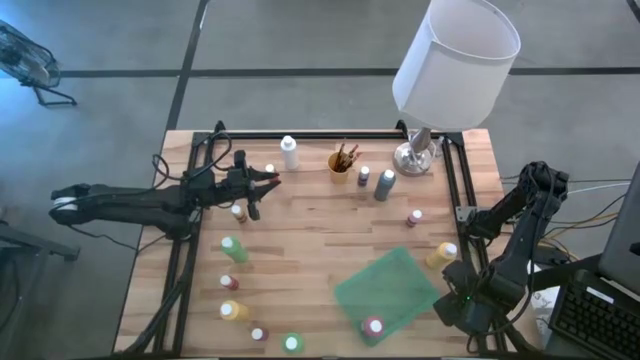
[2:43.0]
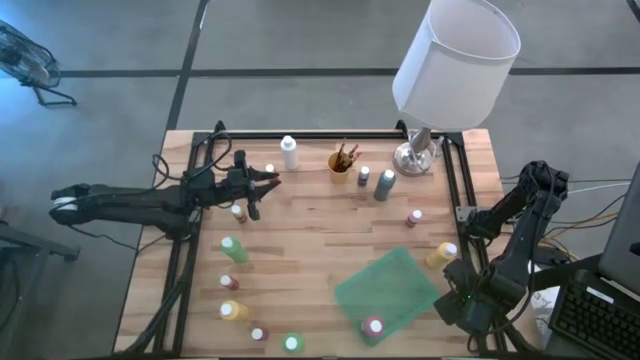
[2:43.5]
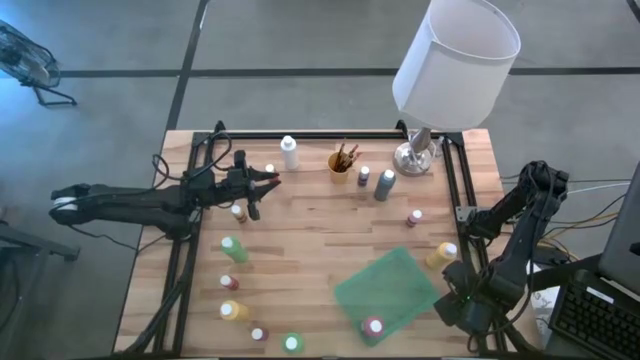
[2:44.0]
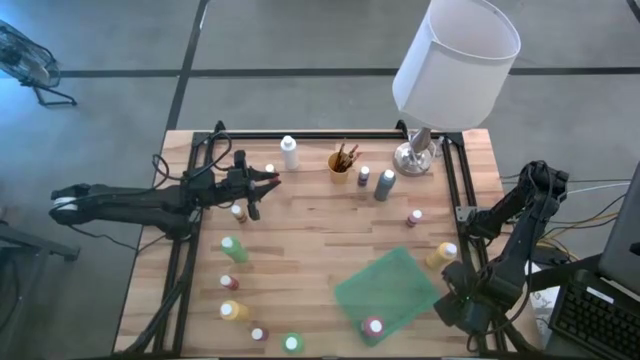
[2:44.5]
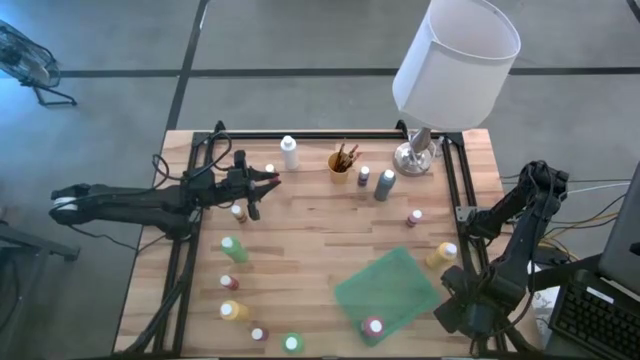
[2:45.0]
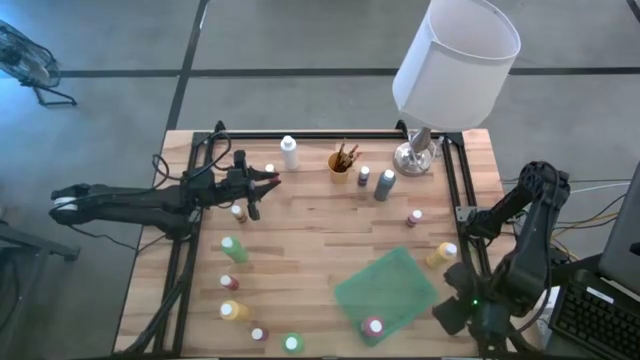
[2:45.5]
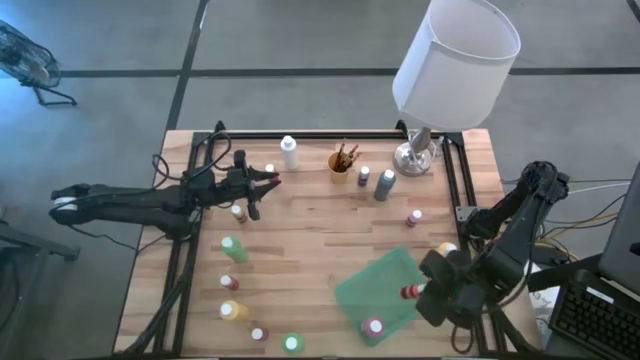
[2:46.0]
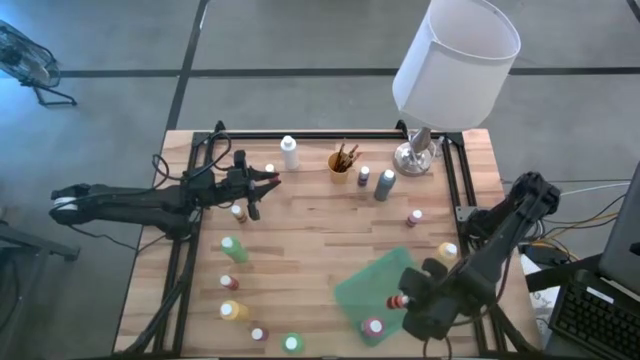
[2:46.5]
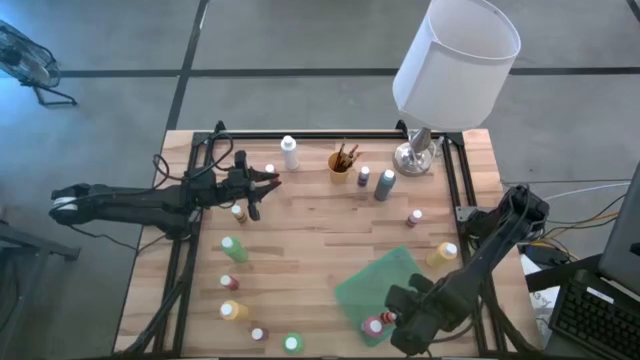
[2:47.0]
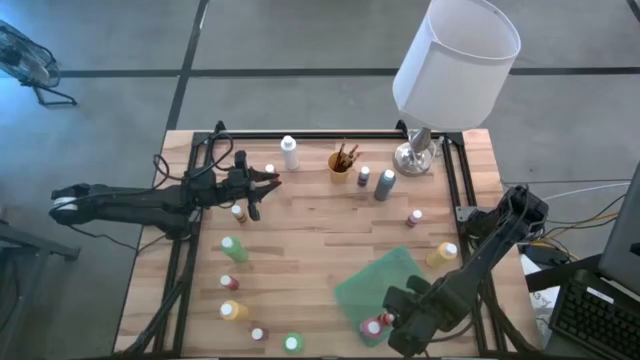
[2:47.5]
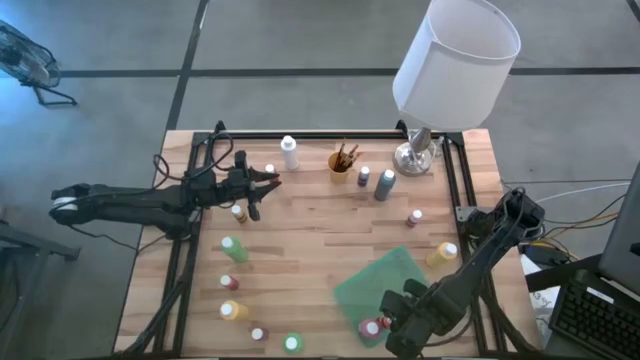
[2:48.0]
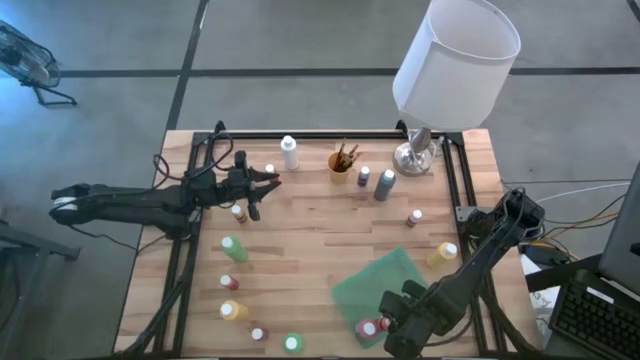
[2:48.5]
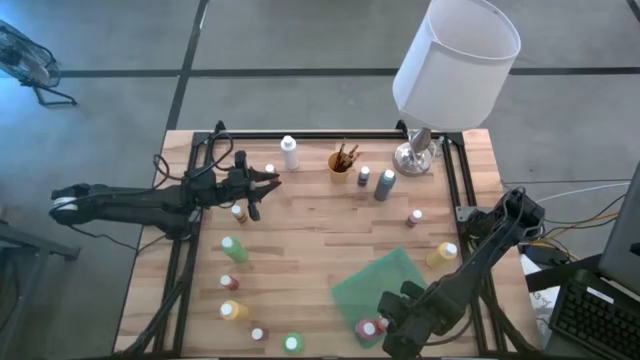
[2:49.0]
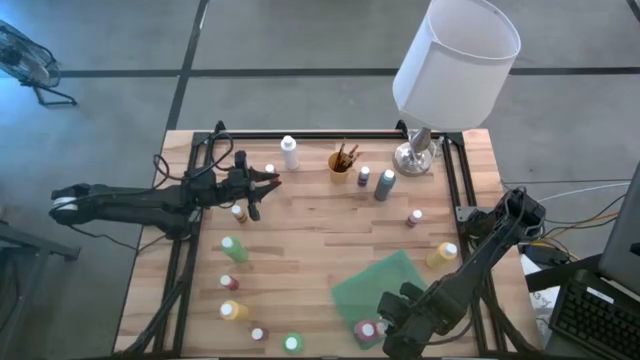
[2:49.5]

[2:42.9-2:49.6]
Task: Pick & Place Paint Supplies
Put the orange paint bottle into the green bin

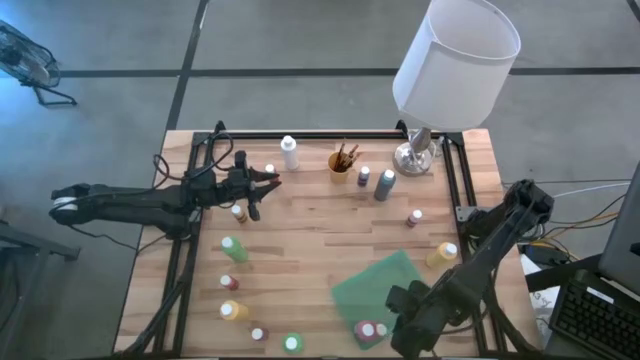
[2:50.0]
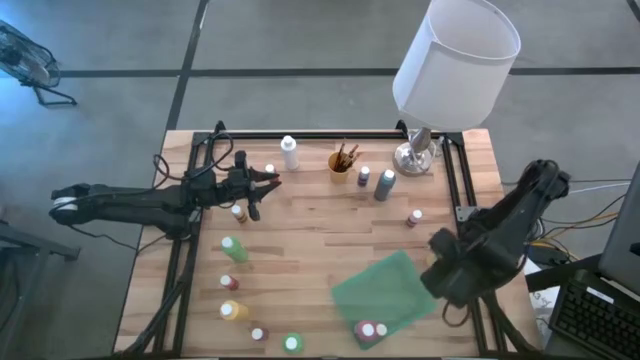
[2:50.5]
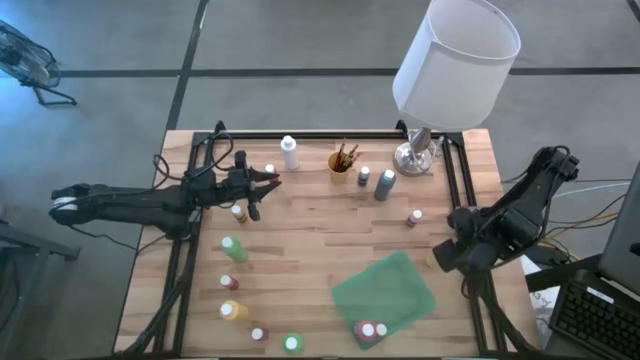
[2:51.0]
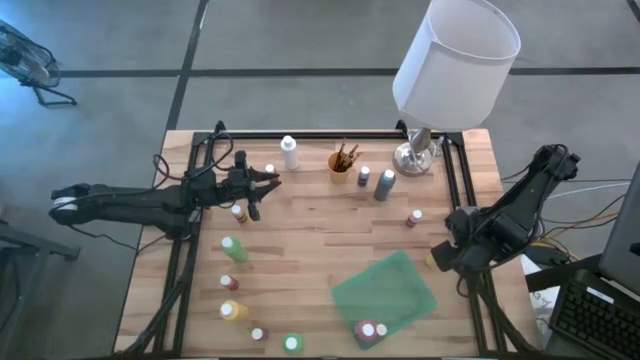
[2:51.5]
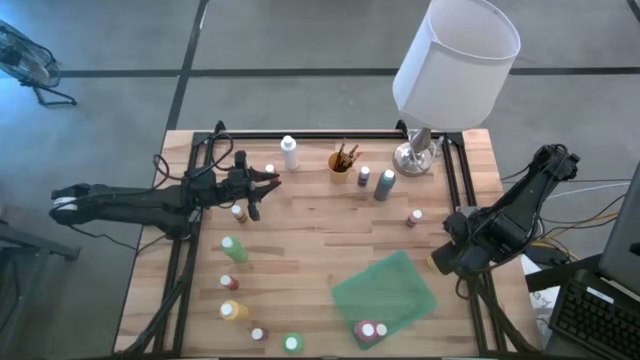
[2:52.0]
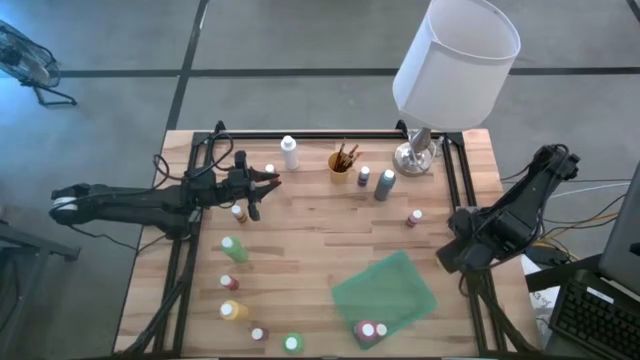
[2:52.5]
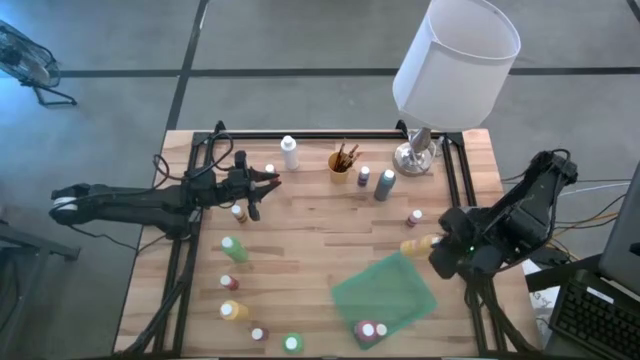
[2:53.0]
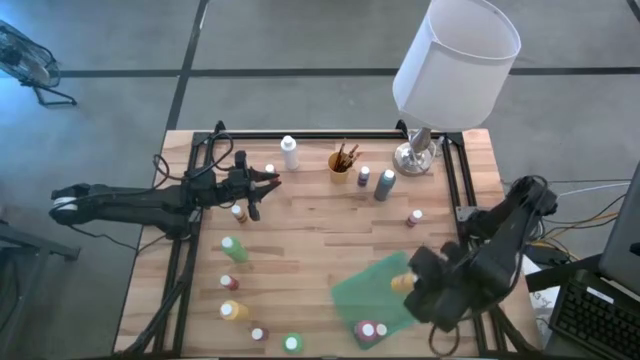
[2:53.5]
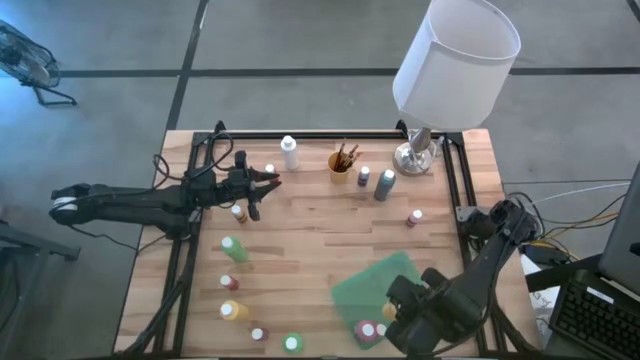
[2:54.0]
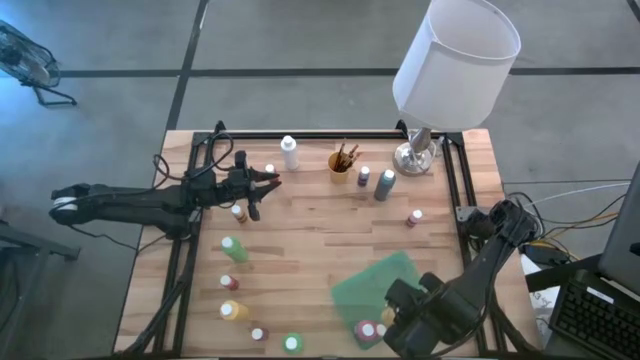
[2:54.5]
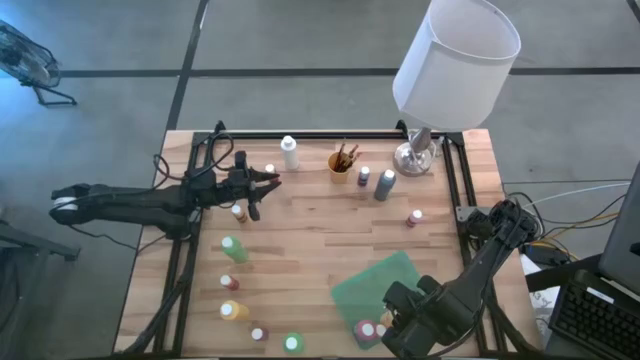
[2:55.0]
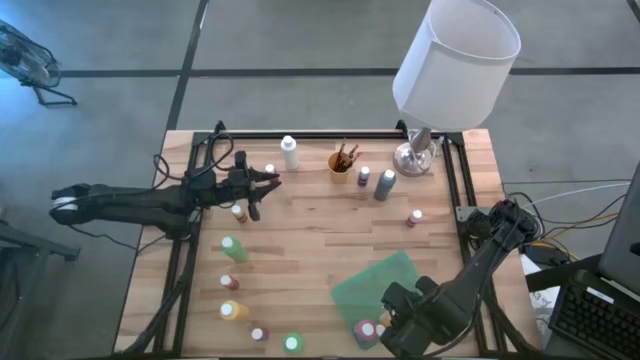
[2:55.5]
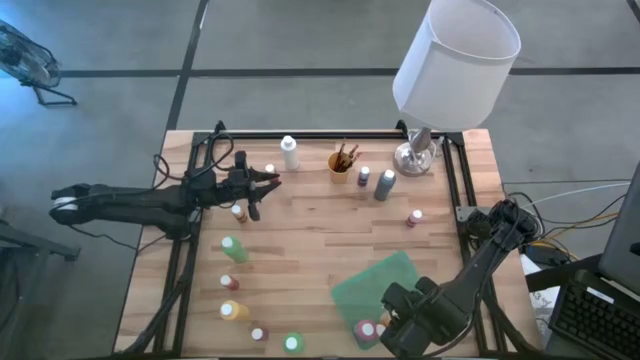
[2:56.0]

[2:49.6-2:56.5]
Put the big yellow paint bottle into the green bin

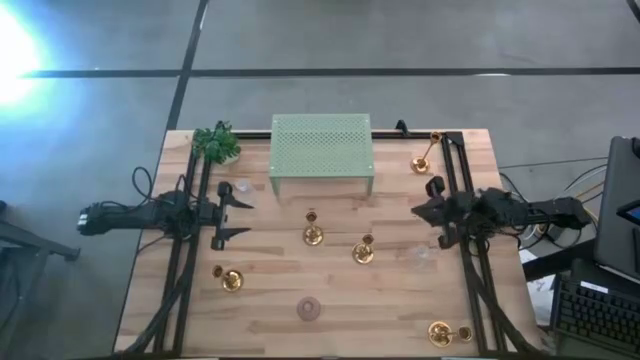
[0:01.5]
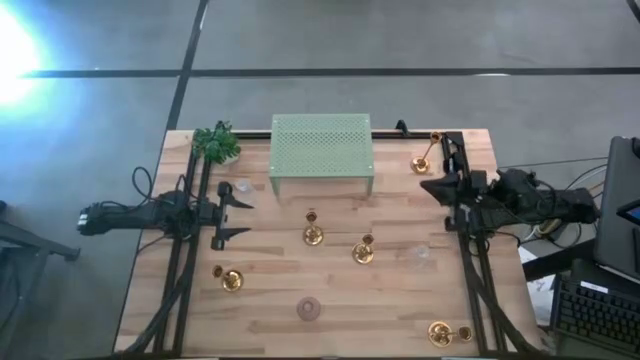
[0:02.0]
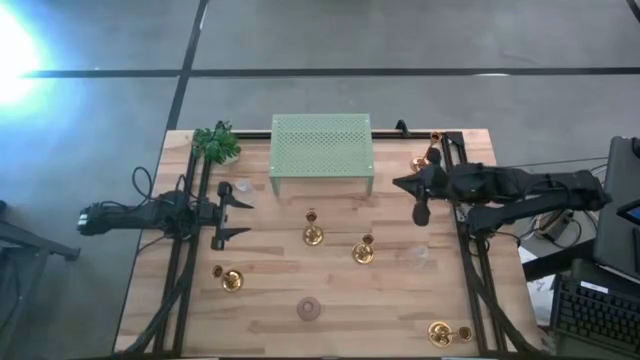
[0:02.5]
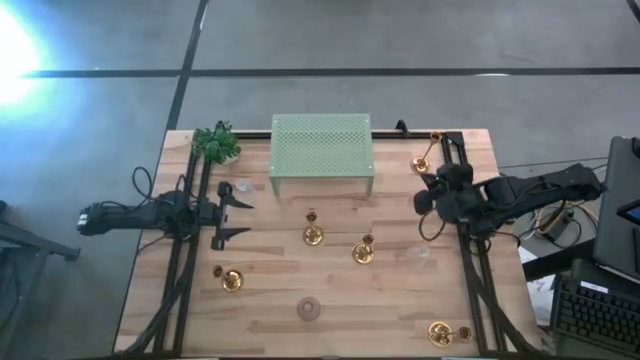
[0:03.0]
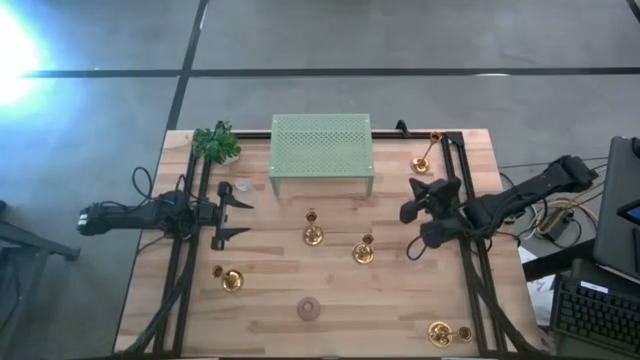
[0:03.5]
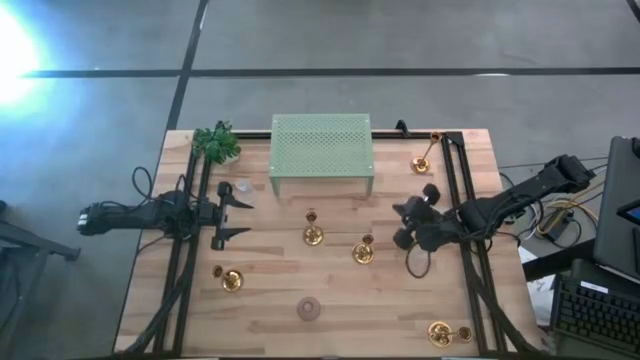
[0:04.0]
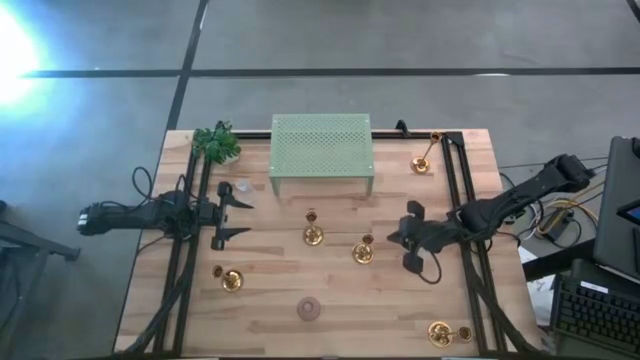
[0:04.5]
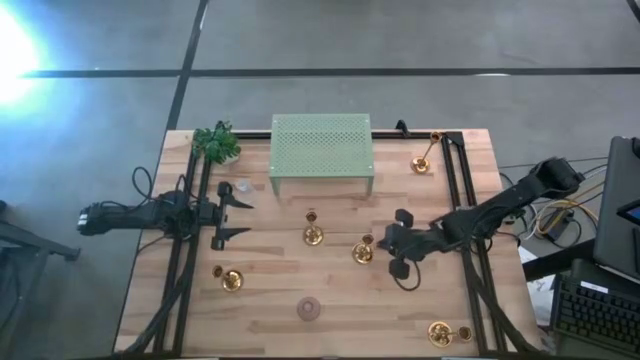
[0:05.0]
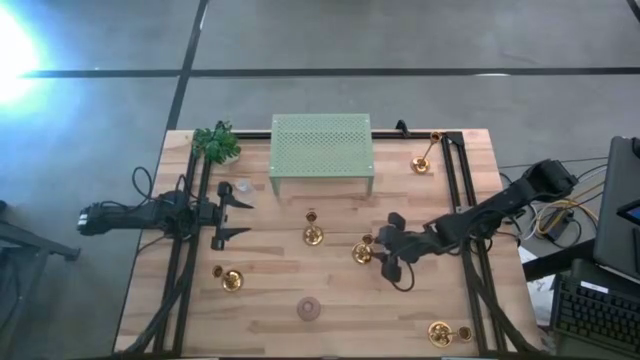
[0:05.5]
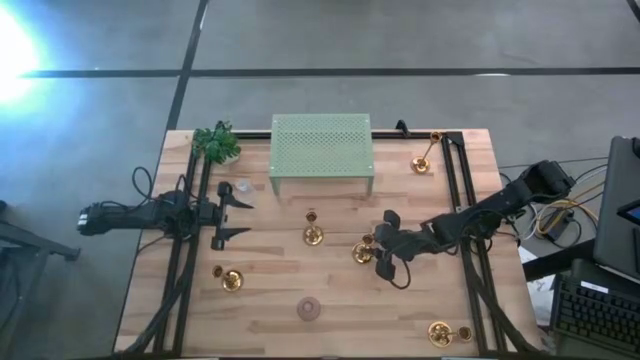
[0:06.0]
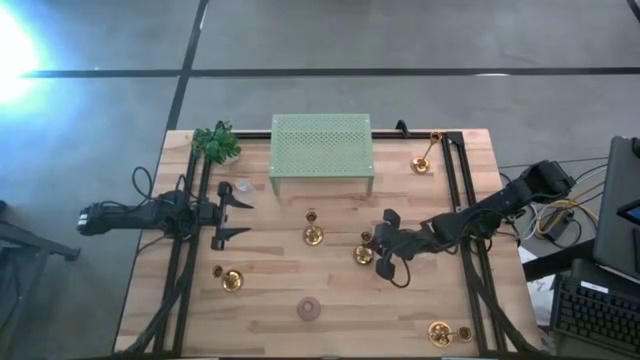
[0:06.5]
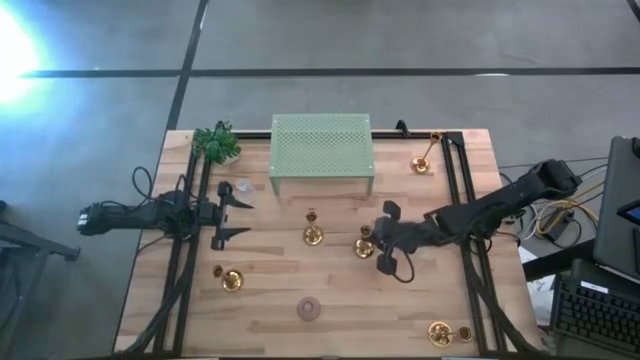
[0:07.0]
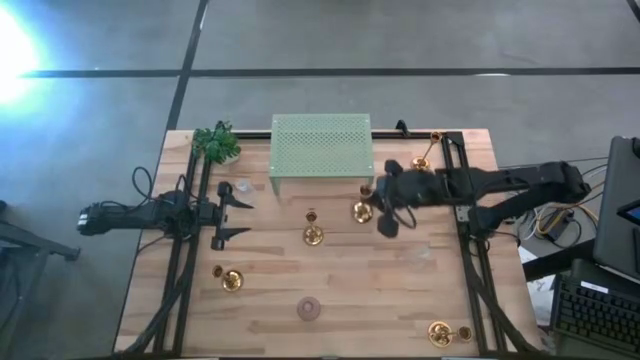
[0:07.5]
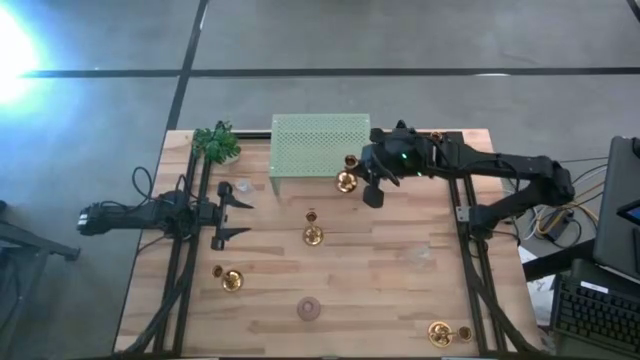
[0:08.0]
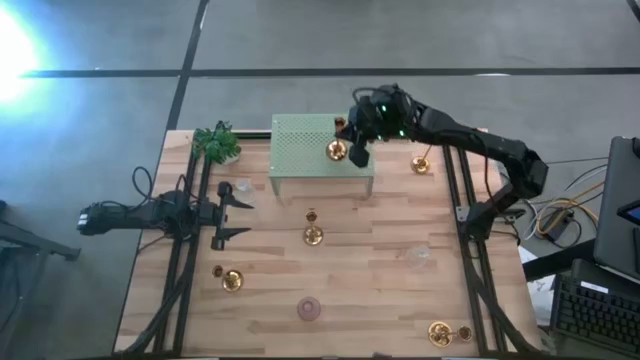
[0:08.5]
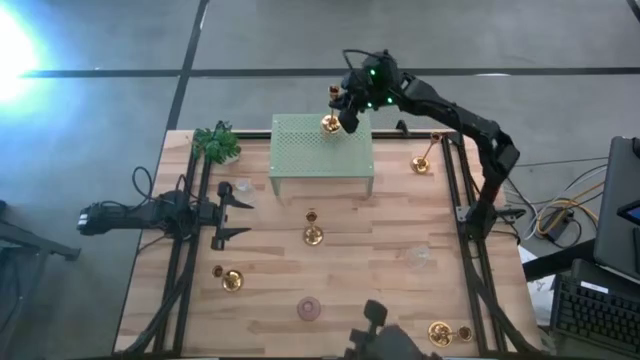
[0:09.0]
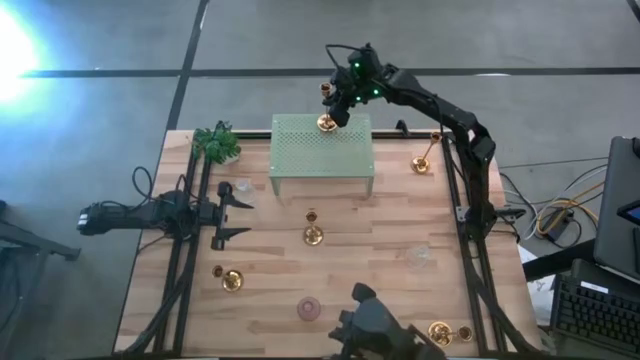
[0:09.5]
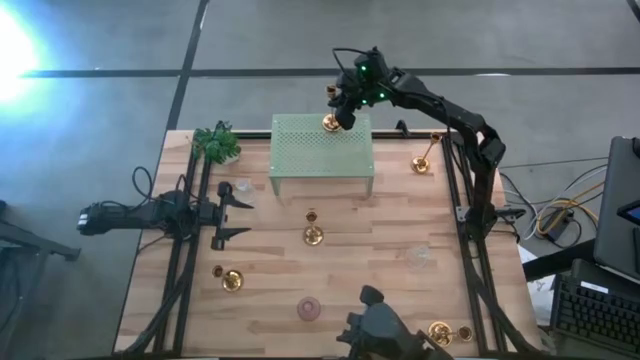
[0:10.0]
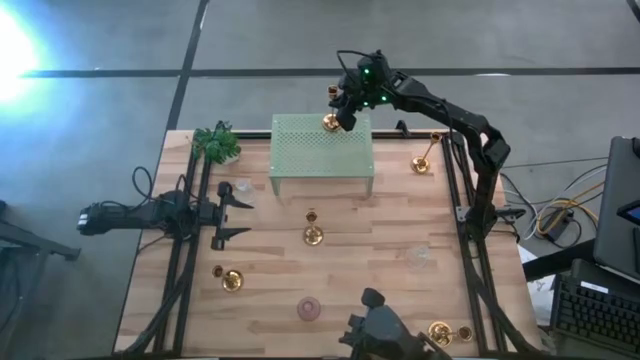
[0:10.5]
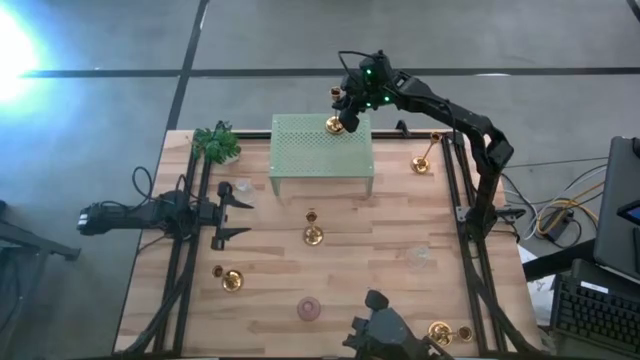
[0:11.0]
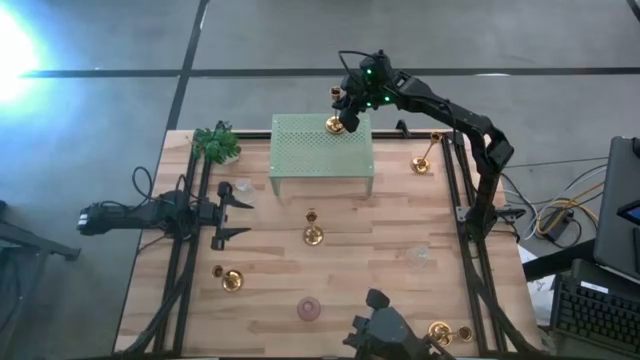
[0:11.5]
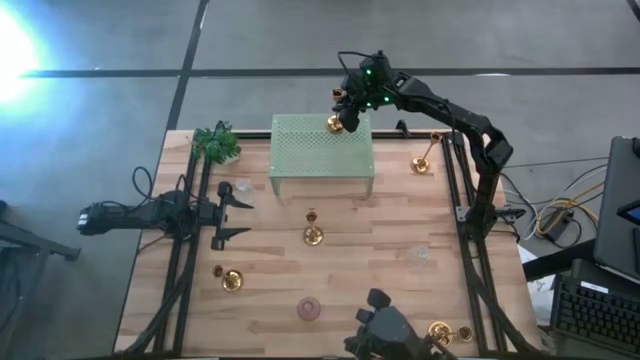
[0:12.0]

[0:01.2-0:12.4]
Task: Pick & Place candle stick holders
Put the gold candle holder on the shelf
